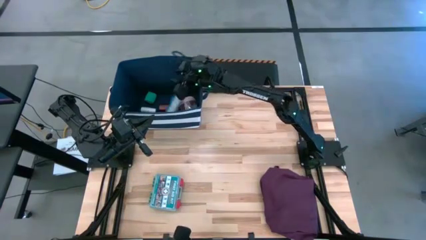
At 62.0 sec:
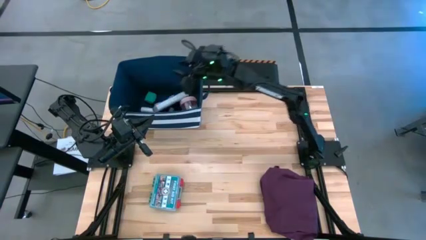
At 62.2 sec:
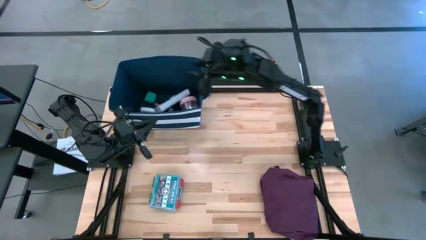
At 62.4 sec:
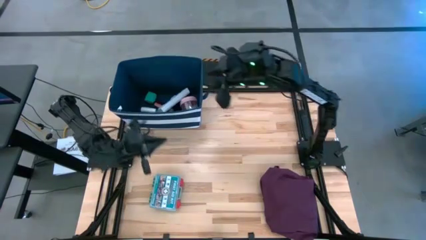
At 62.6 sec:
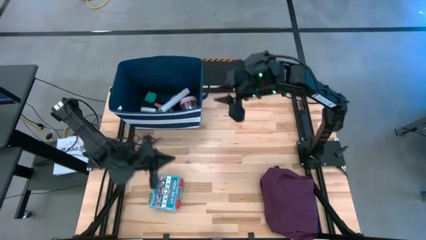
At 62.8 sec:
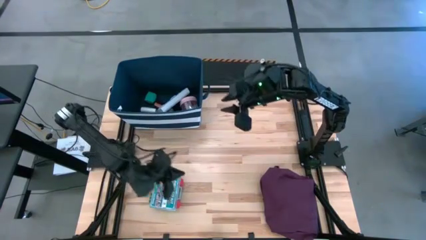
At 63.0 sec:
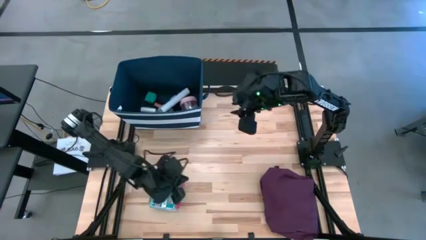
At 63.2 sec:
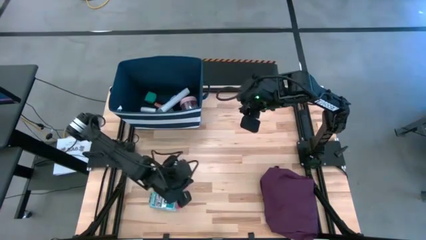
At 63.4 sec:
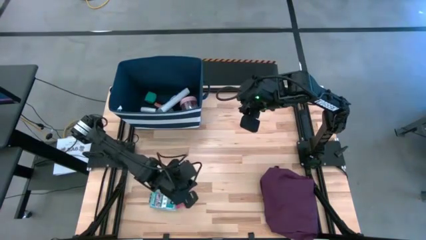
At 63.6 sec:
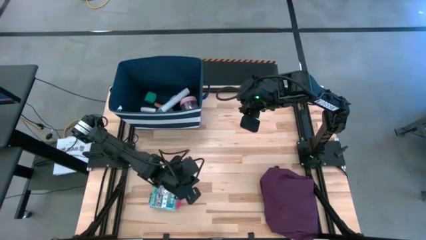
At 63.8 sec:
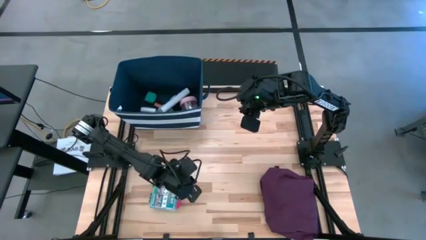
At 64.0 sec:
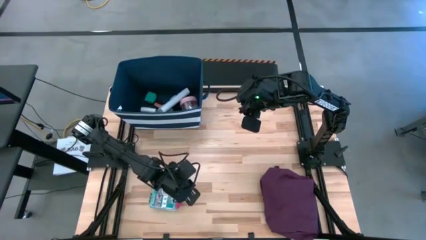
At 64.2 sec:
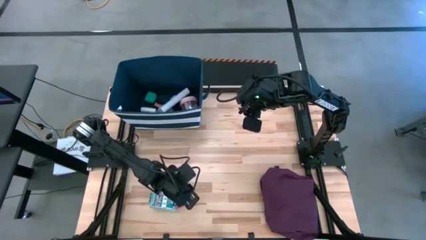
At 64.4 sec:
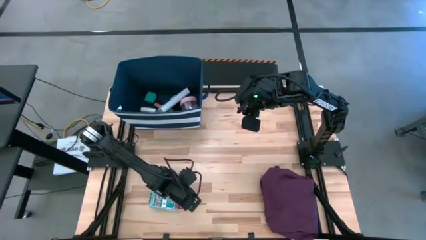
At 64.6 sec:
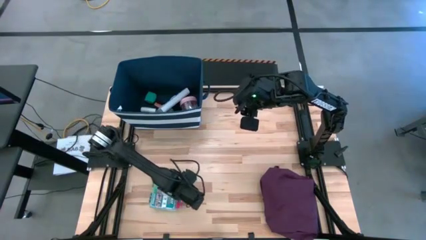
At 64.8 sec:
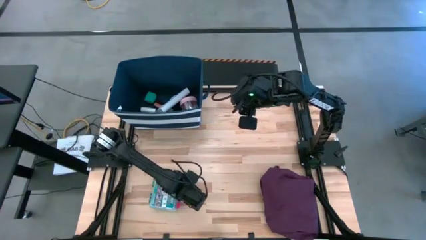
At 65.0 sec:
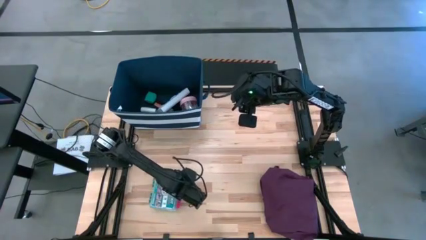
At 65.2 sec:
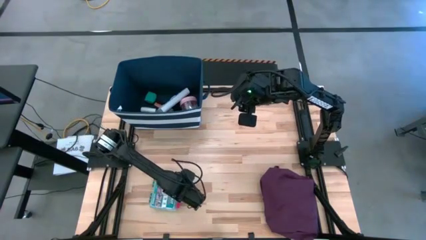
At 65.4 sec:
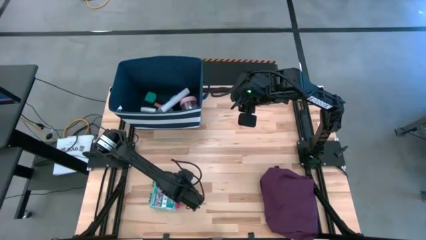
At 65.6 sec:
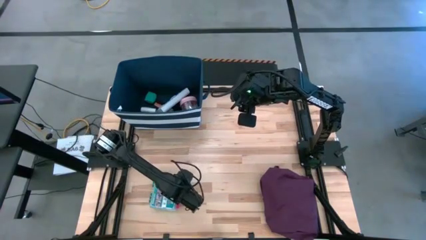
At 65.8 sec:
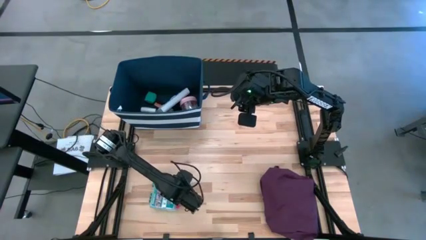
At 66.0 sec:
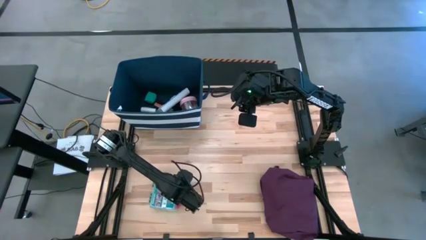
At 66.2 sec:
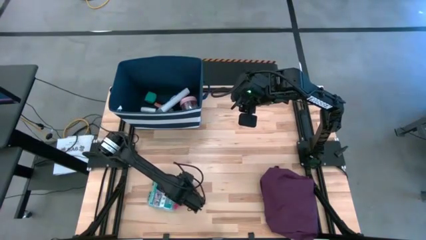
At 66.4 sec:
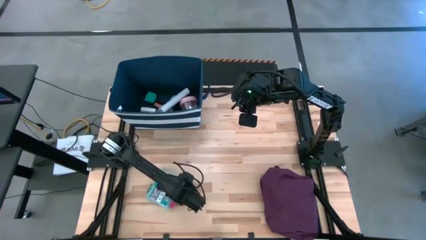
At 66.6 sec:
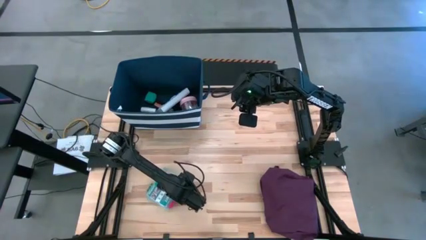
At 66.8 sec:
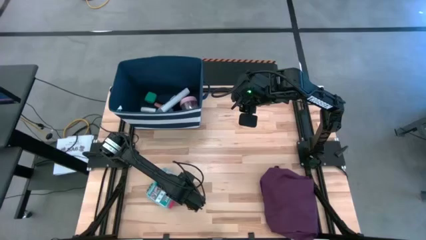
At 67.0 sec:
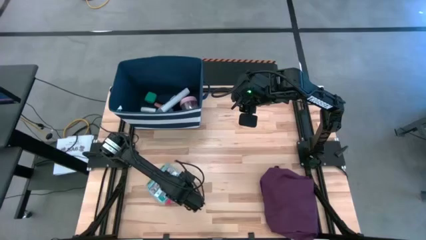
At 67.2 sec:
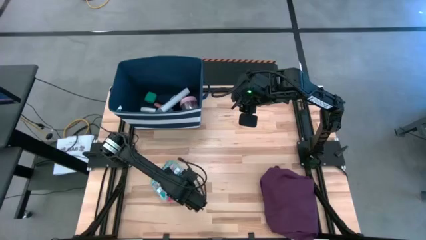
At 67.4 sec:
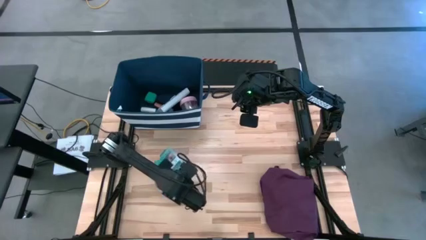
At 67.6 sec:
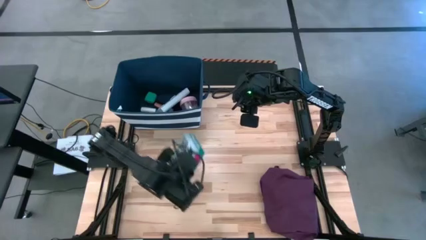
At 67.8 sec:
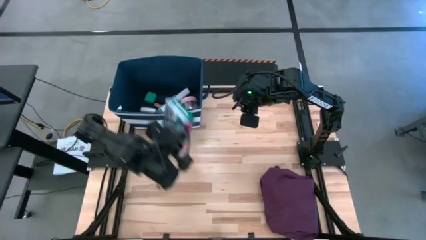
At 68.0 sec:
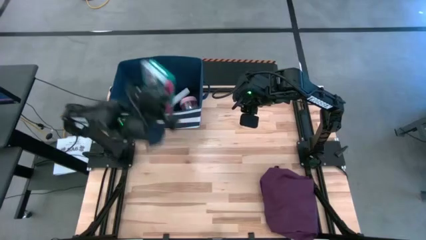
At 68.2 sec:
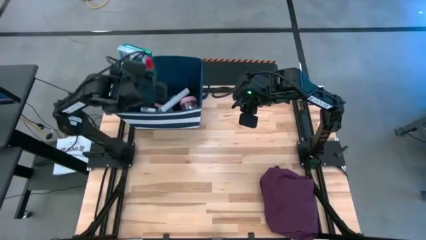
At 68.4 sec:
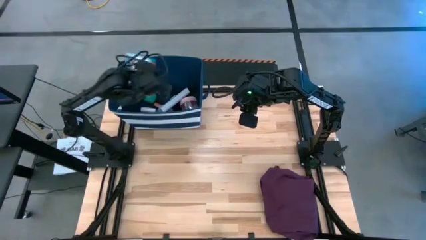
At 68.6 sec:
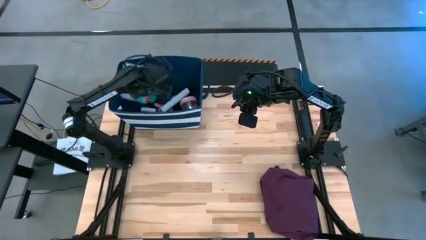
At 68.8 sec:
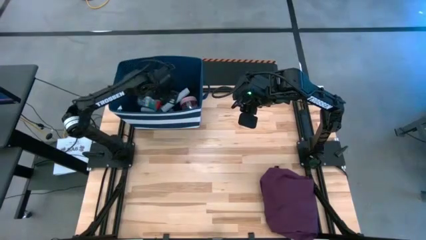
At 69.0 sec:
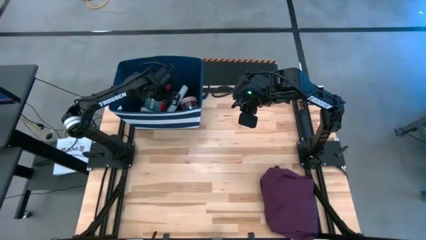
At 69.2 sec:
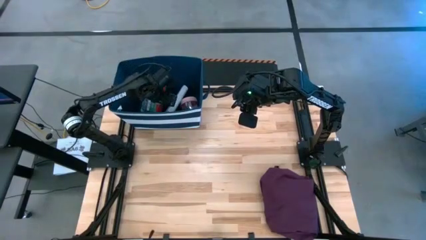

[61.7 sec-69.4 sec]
Task: Pick & place medical supplies in basket/bin
Put the green first aid kit into the blue bin

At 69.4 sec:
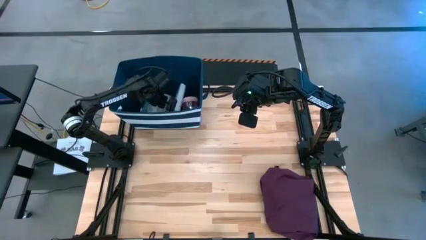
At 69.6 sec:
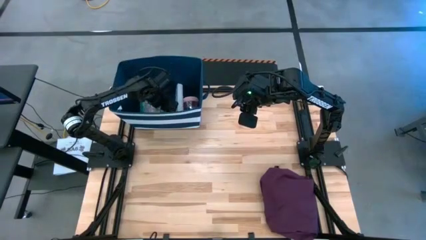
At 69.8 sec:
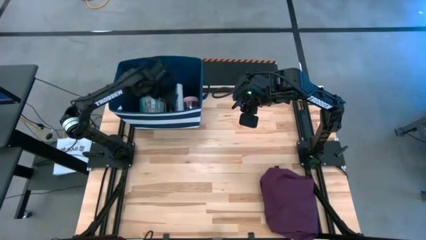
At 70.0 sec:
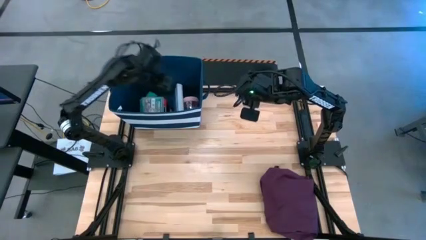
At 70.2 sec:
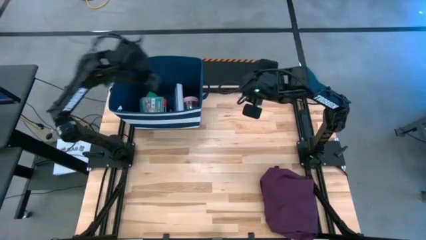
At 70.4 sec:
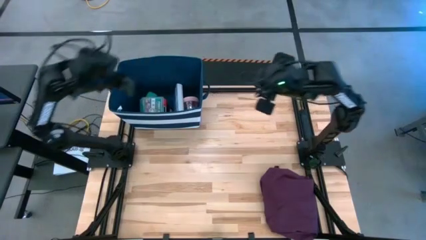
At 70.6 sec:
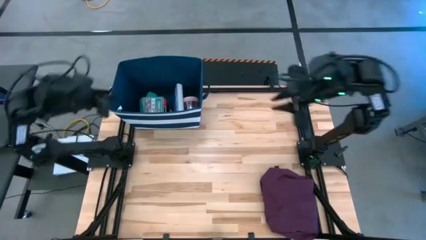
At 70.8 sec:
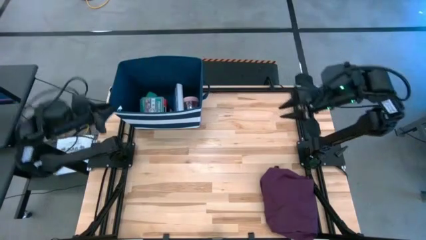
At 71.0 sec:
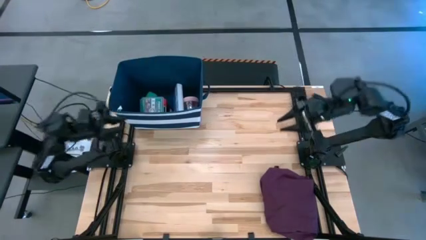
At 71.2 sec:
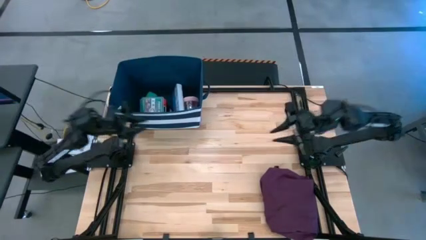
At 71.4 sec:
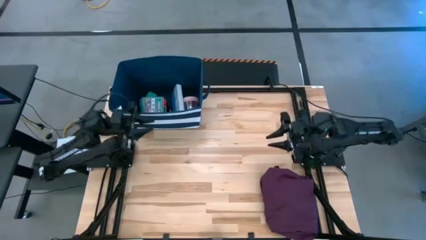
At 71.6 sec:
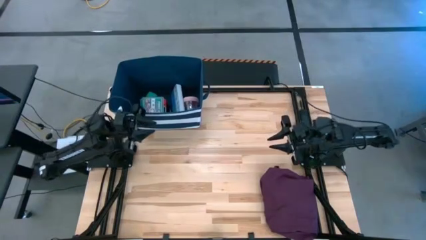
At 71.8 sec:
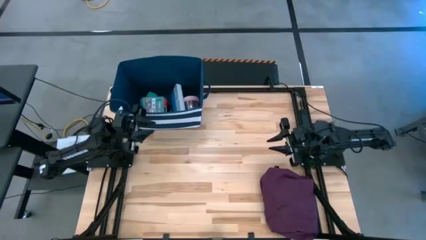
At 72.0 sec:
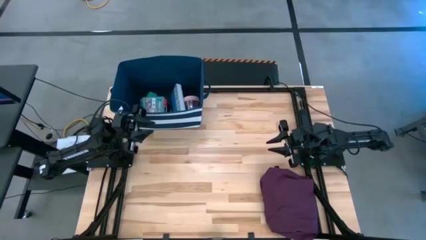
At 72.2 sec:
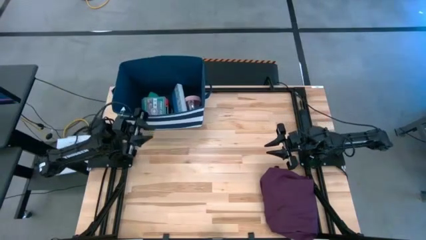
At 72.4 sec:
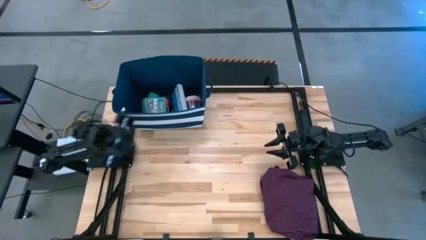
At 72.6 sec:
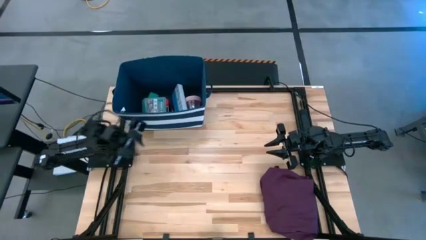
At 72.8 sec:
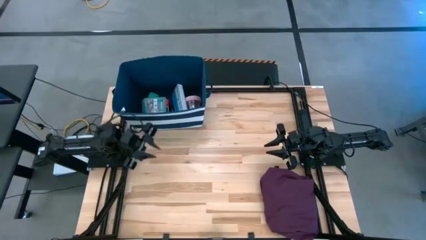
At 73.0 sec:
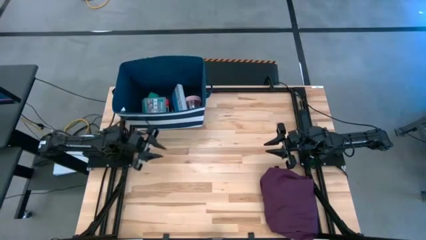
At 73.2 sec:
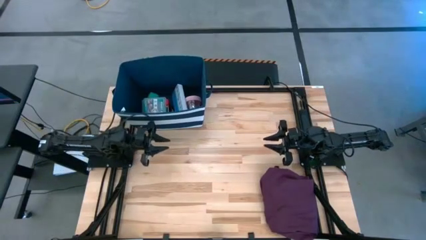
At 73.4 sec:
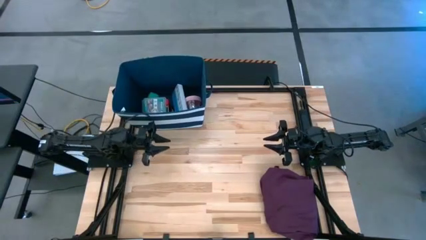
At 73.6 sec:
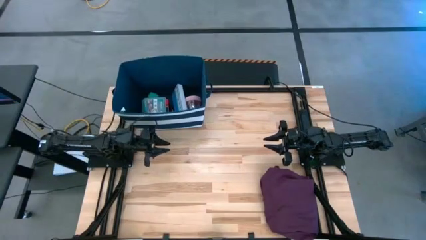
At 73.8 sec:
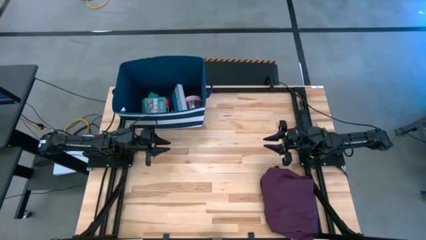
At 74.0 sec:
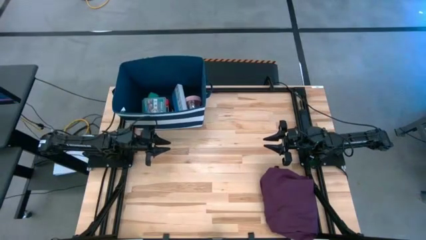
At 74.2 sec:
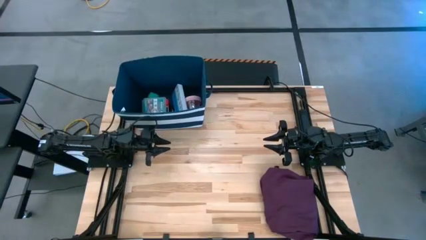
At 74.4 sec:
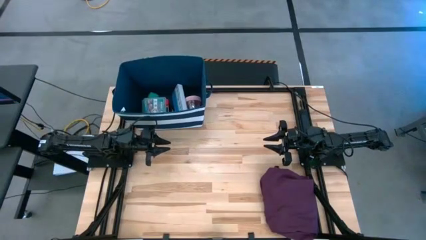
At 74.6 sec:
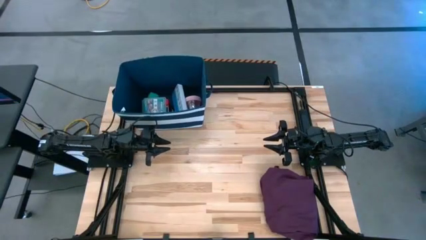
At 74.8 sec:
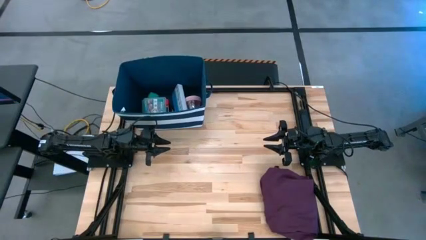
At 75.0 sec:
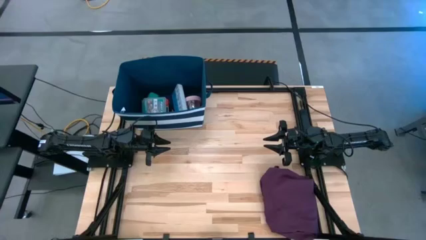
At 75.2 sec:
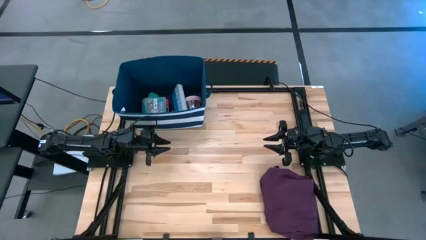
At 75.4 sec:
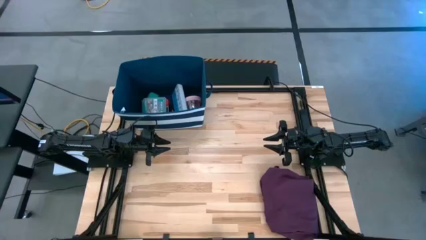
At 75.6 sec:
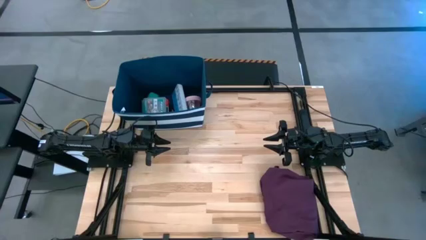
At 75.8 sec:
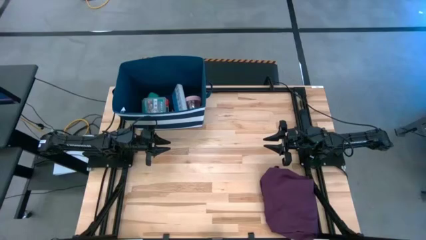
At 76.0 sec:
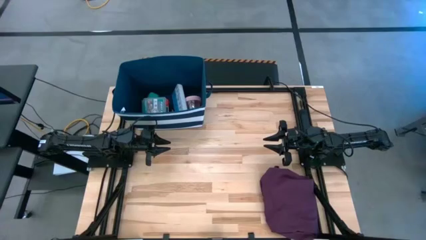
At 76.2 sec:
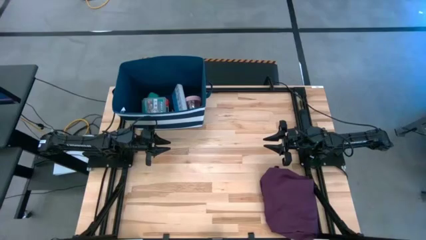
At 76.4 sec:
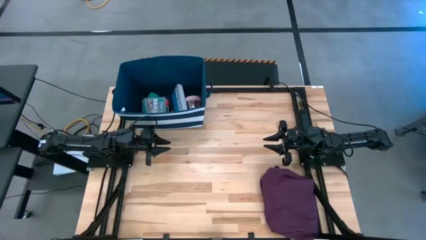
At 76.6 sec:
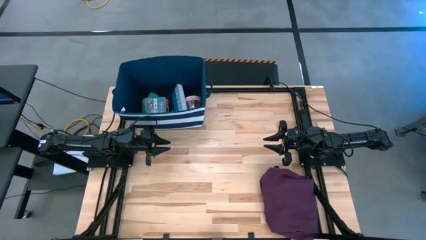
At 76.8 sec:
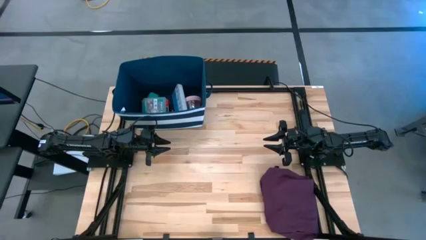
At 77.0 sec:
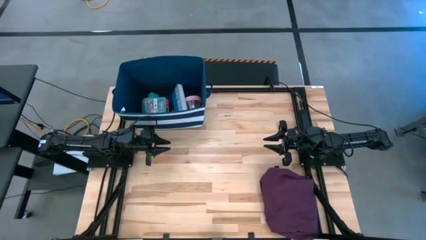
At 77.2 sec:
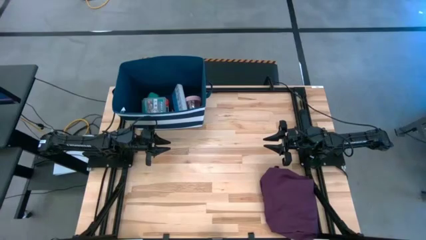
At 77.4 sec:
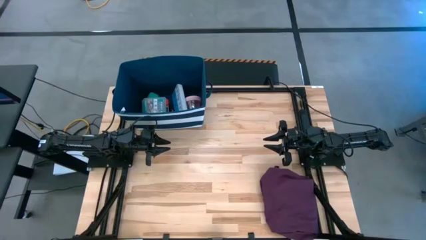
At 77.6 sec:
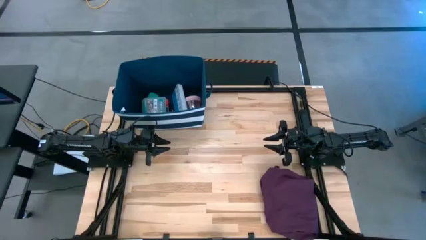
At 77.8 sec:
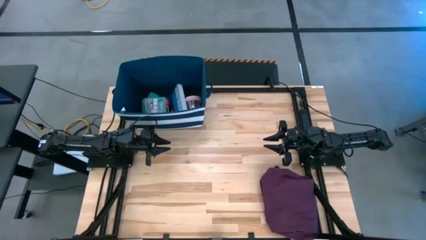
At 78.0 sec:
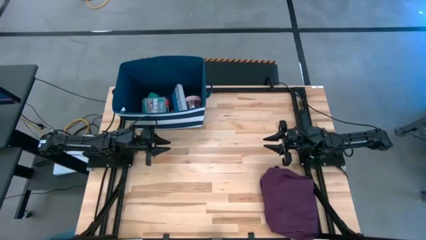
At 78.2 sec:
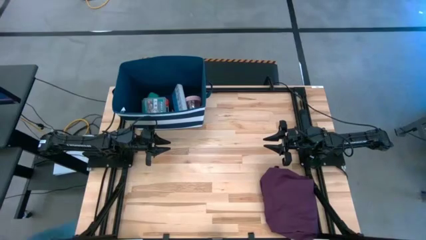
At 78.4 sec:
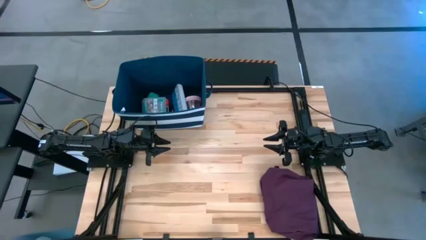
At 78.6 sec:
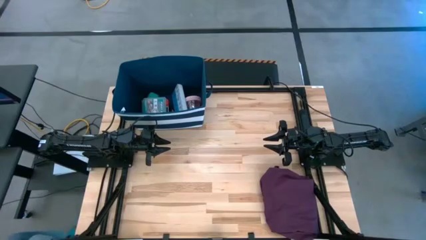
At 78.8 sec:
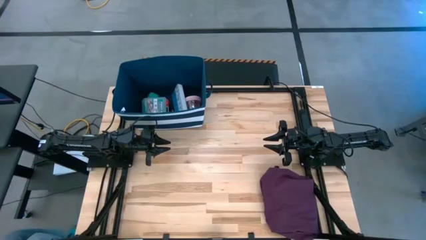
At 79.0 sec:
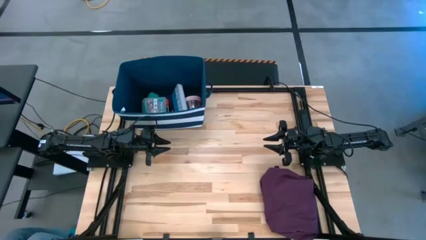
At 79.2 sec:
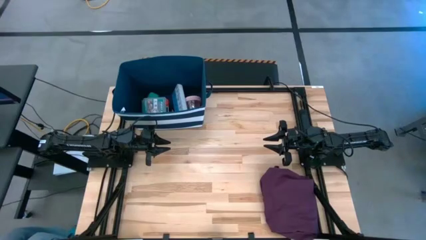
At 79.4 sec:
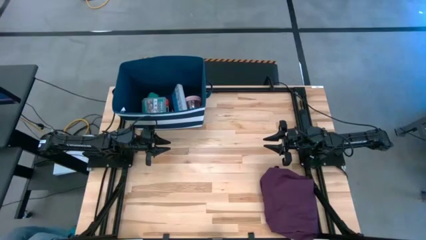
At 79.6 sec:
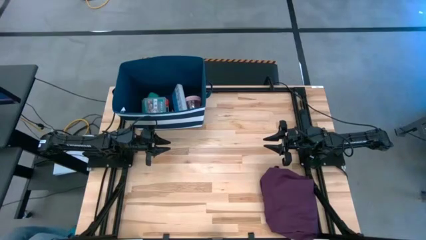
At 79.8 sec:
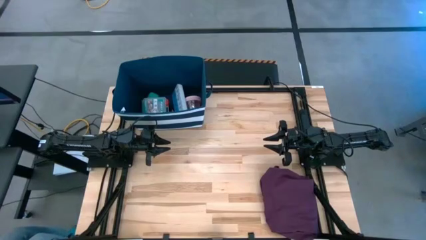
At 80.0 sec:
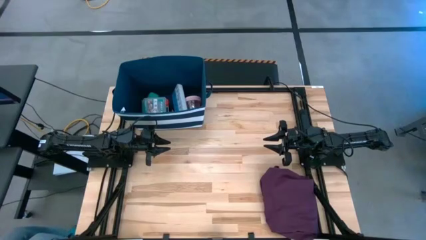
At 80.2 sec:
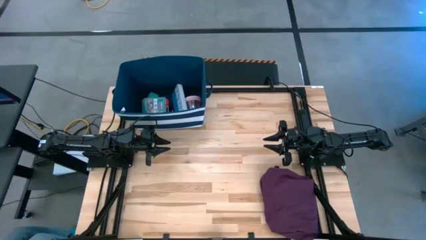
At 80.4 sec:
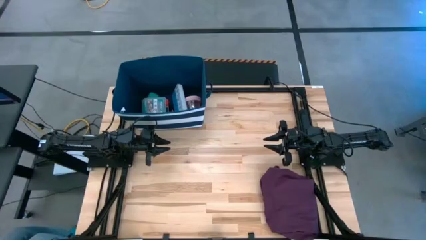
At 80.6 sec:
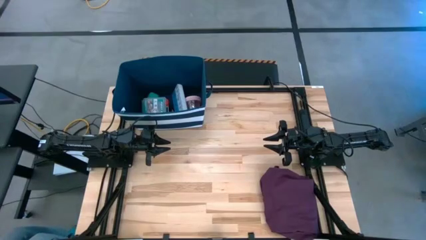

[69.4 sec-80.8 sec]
Return to Home Position
